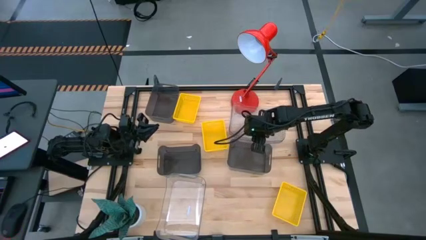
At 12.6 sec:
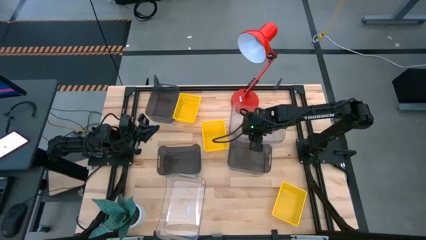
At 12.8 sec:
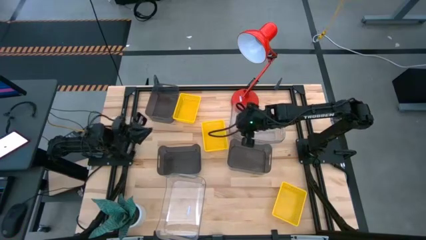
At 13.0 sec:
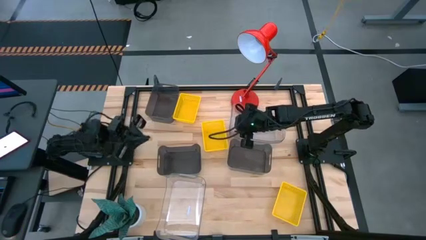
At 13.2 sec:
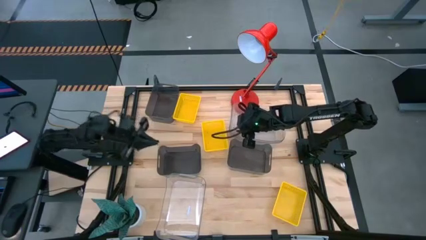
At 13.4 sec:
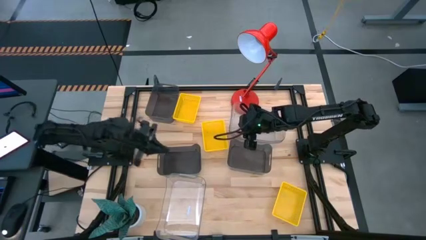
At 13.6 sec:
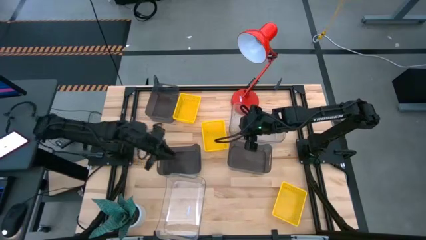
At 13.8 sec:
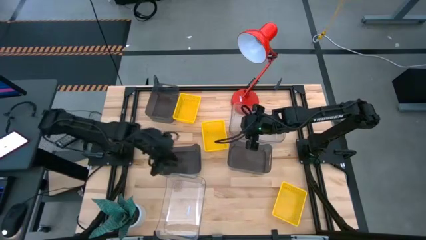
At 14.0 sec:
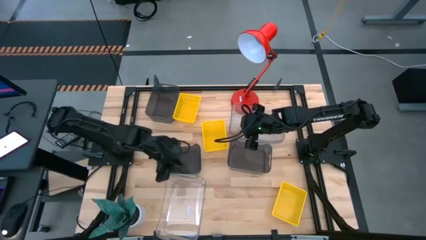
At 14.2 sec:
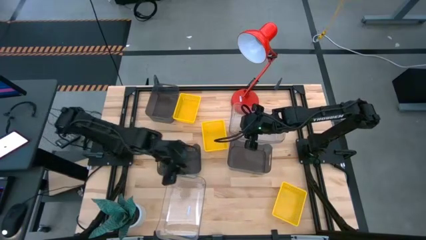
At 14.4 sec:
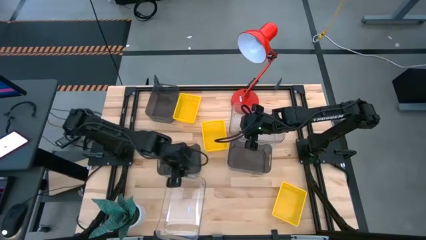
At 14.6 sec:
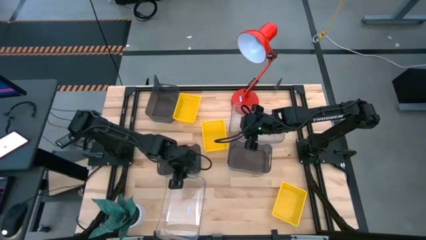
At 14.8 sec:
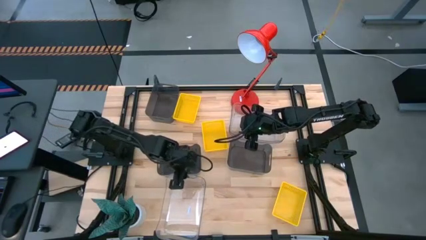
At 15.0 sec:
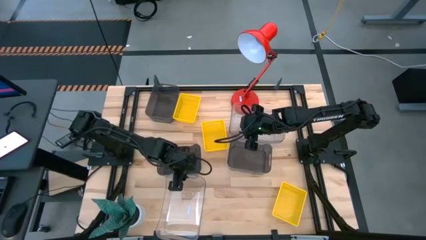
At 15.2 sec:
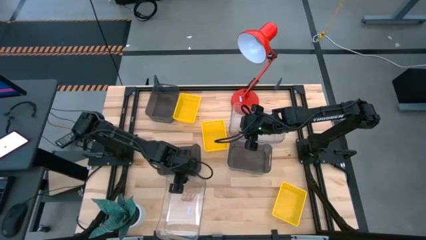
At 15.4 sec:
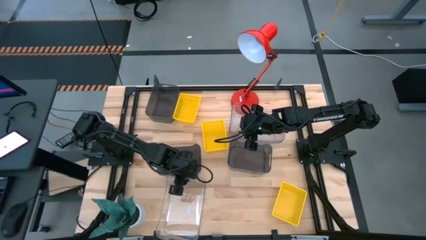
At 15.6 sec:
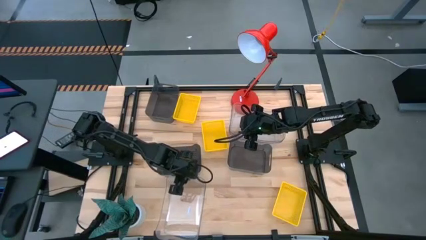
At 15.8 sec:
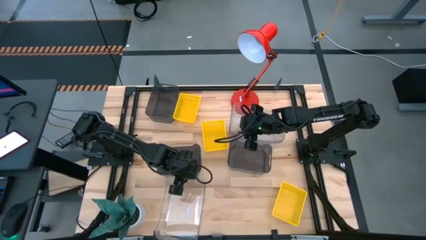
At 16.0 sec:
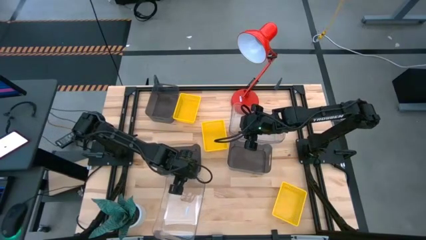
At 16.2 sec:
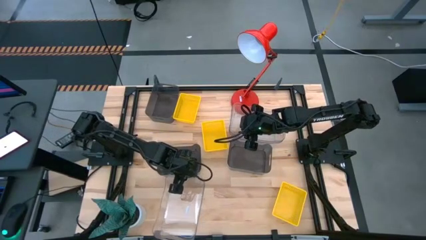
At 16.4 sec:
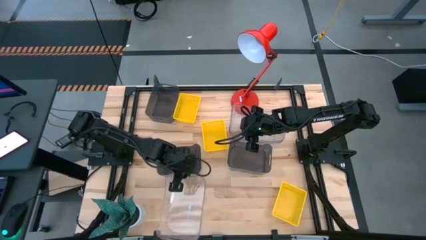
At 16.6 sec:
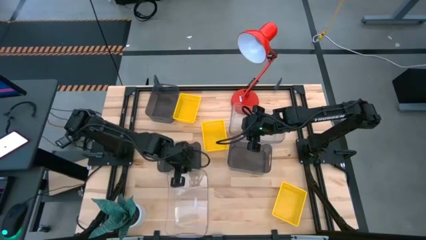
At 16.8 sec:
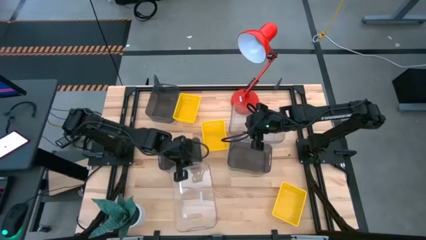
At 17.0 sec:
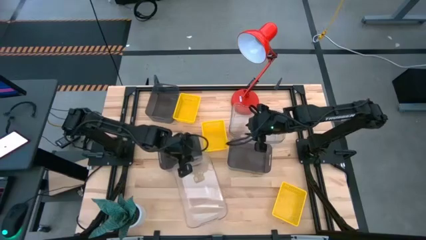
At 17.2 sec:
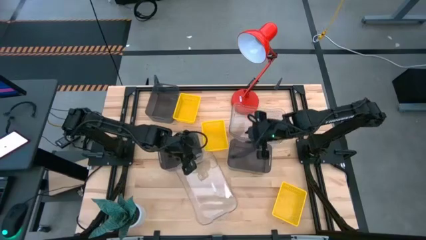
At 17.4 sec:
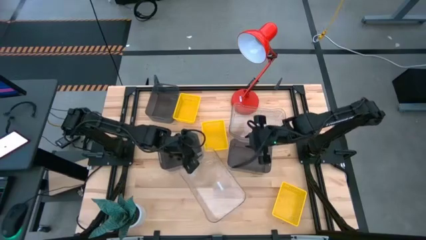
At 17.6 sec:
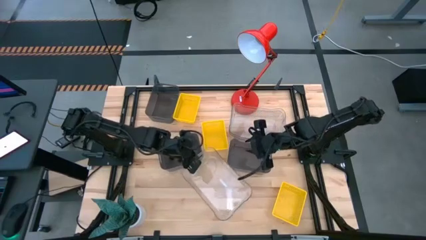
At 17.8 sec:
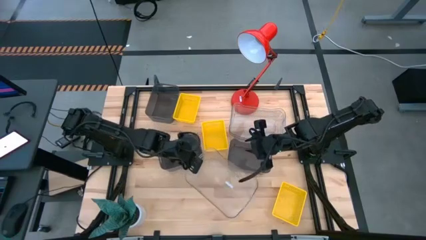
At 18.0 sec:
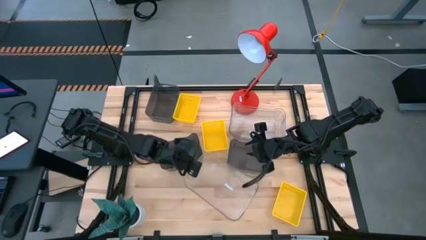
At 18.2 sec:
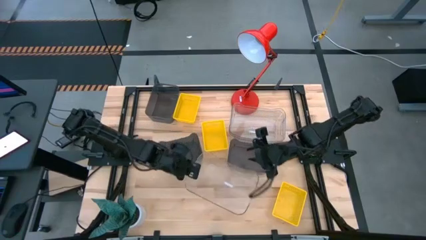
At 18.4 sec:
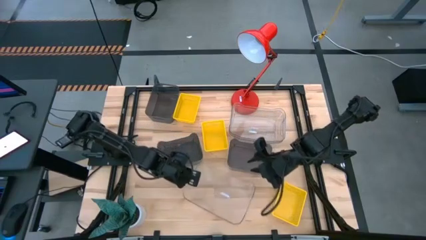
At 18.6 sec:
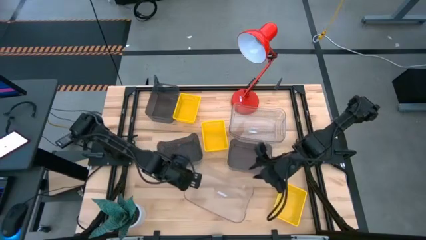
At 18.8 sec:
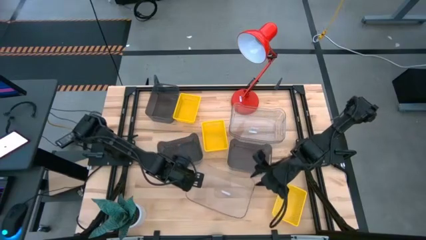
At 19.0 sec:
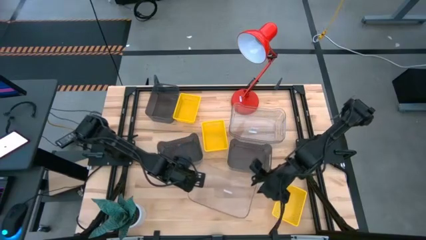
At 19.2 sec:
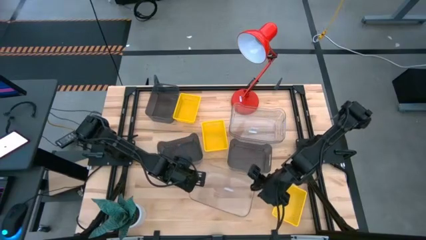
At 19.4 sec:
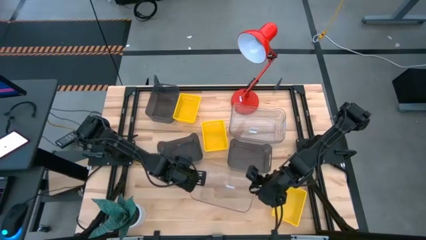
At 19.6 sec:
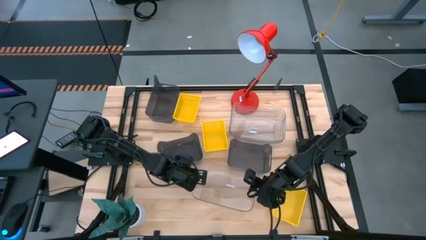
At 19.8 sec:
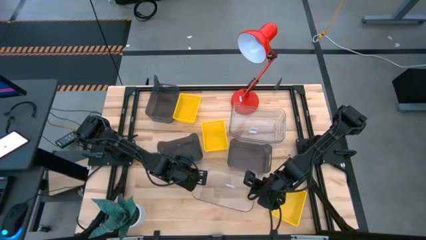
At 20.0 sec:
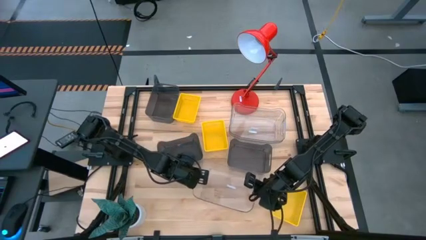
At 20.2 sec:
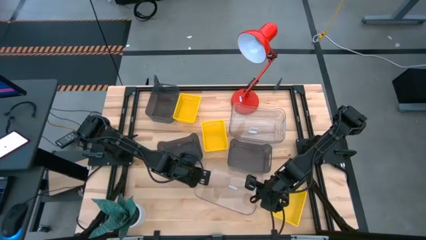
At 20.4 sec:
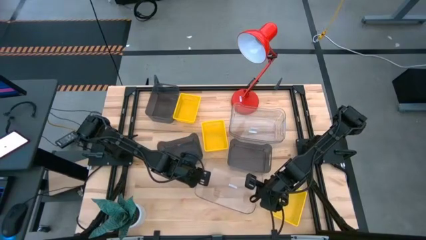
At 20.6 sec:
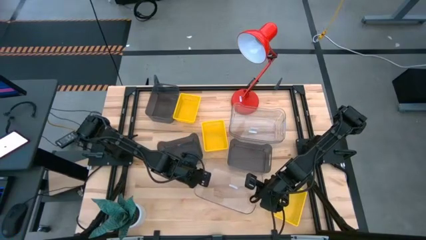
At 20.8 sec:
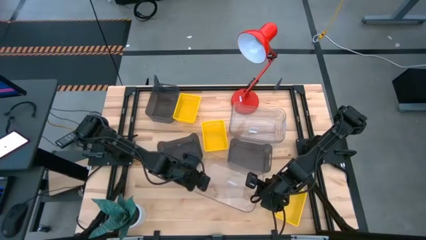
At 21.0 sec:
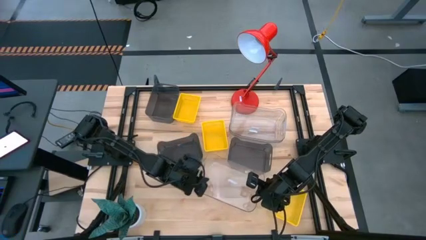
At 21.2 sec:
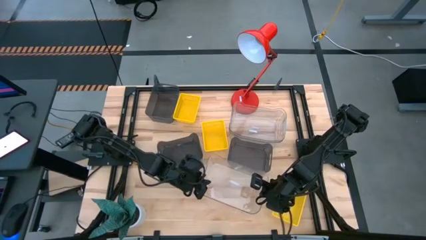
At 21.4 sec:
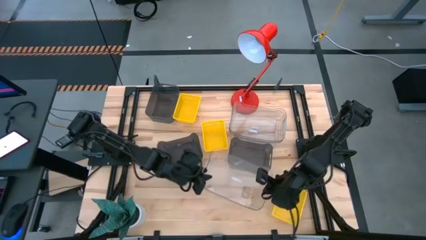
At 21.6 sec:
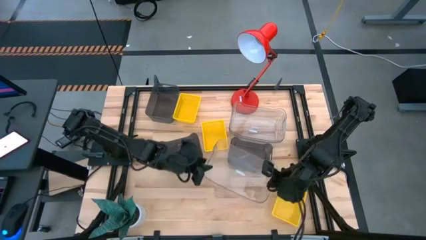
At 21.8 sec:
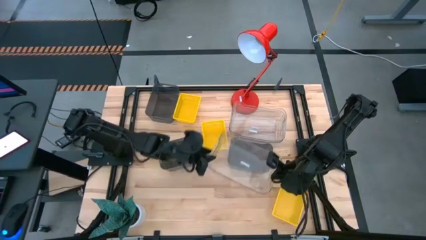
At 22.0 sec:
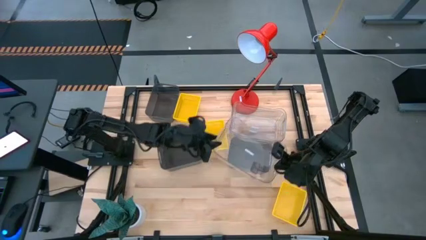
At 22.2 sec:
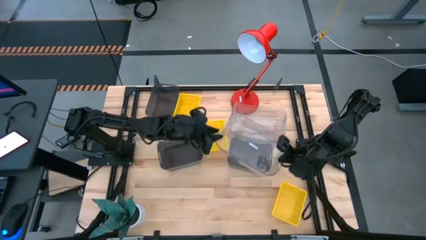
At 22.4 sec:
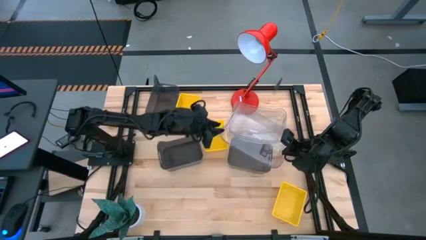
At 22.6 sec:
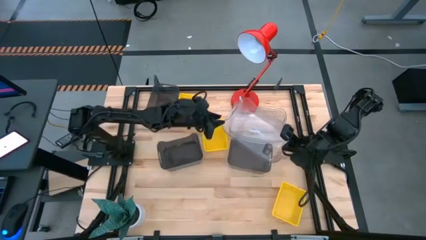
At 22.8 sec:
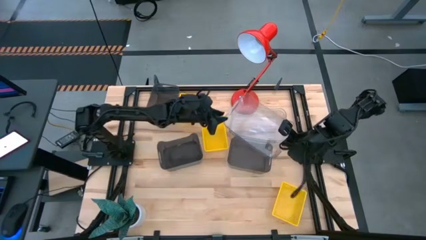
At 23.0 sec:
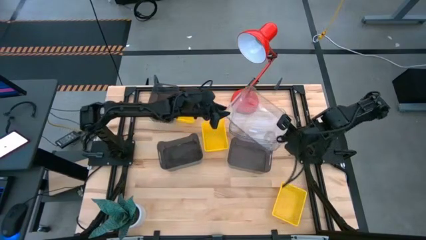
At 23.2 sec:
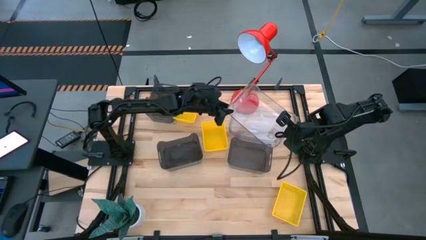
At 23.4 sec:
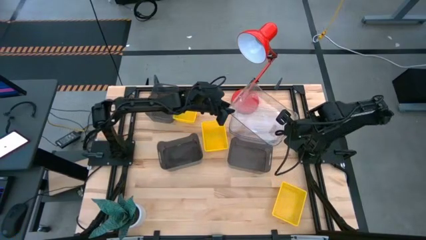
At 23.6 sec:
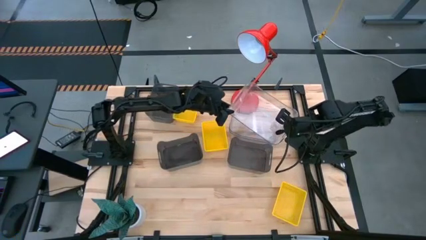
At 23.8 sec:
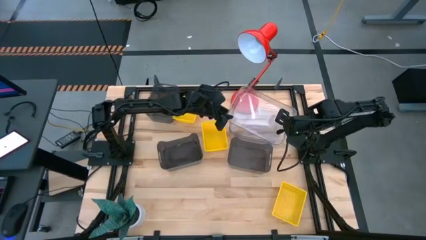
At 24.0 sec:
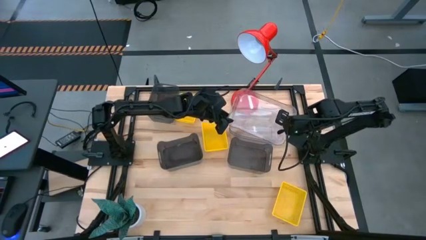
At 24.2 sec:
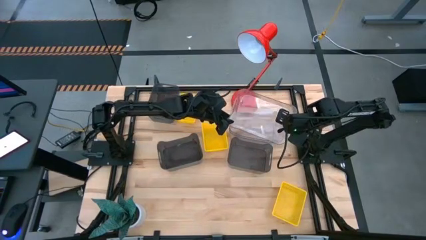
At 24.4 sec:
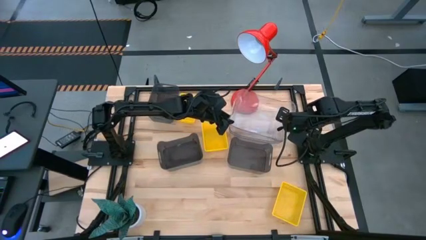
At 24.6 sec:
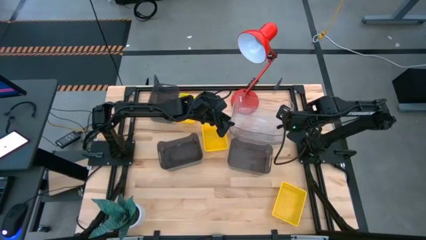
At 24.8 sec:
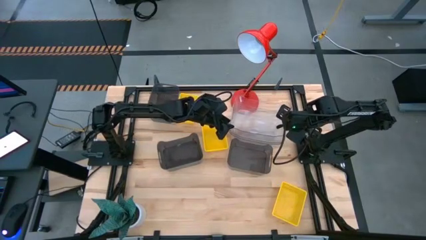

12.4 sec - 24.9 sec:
Stack the bottom transparent bin on top of the top transparent bin
